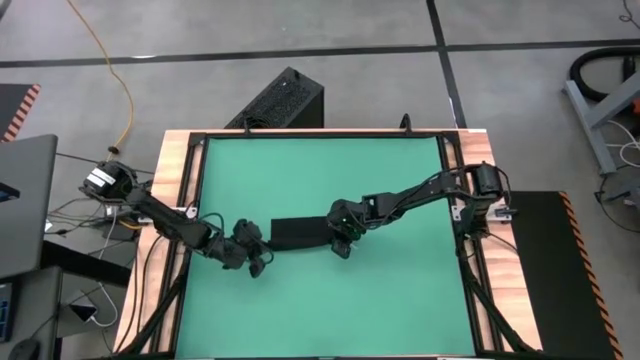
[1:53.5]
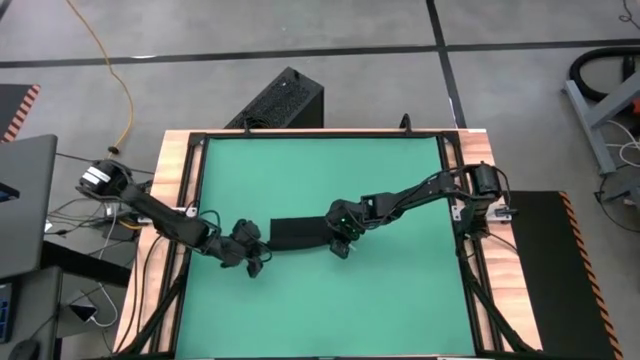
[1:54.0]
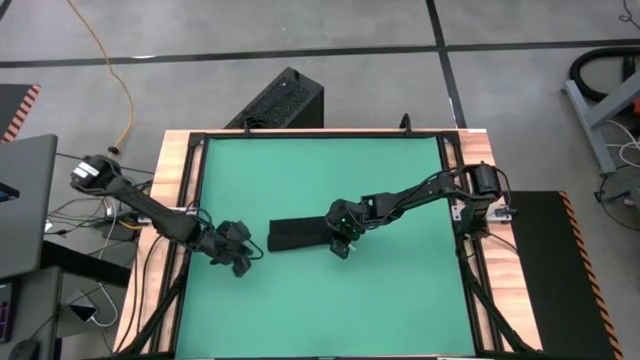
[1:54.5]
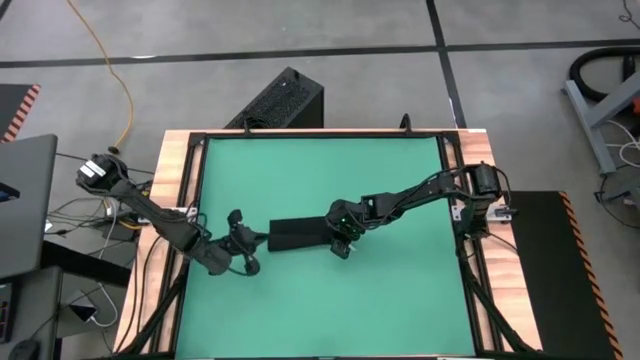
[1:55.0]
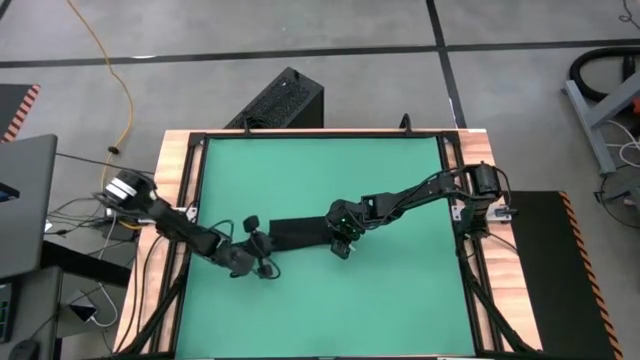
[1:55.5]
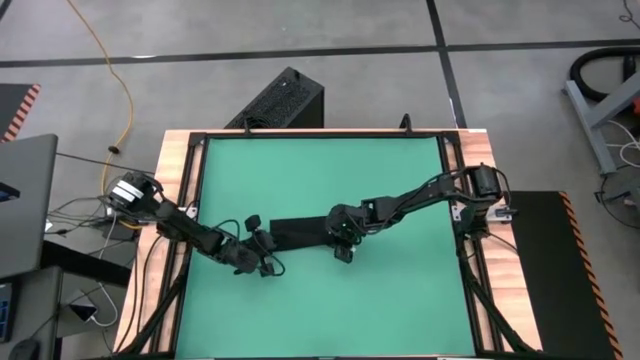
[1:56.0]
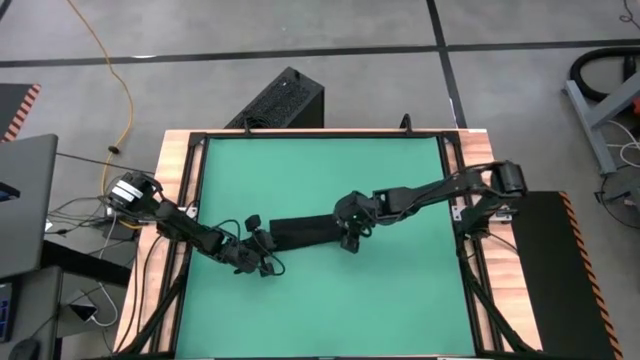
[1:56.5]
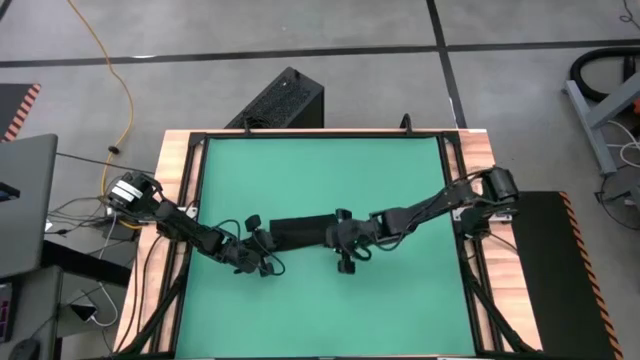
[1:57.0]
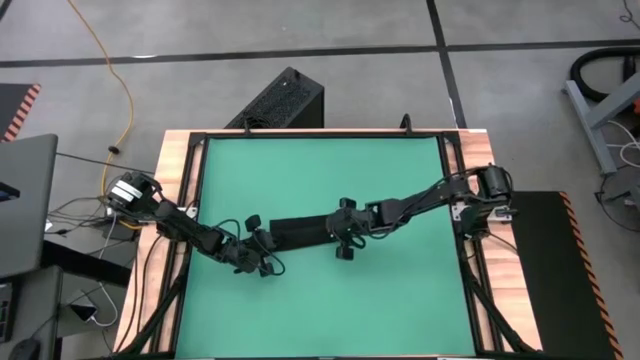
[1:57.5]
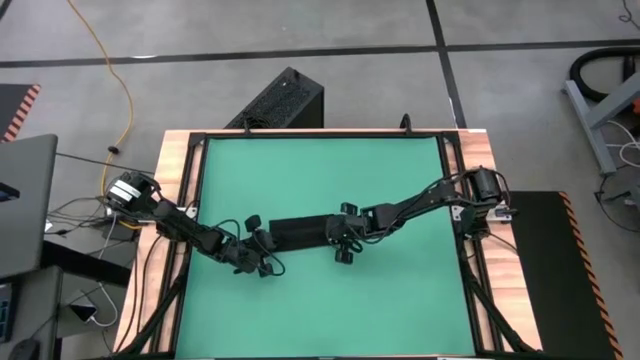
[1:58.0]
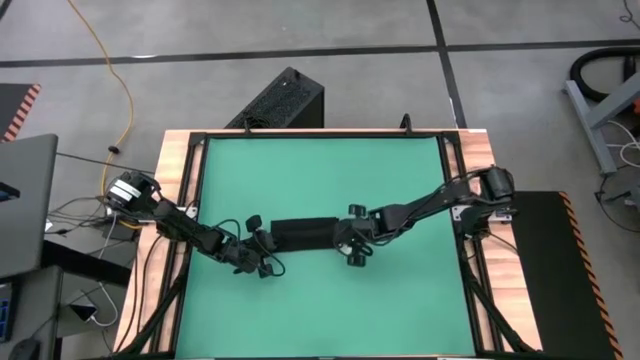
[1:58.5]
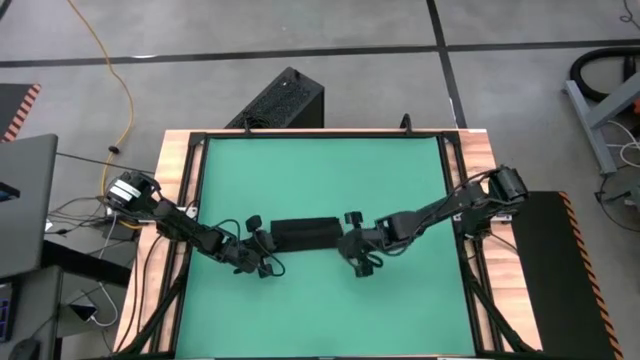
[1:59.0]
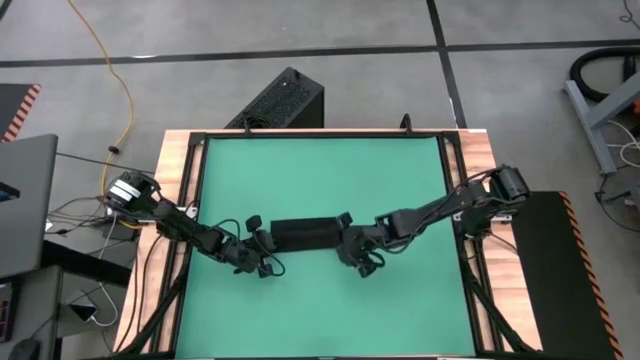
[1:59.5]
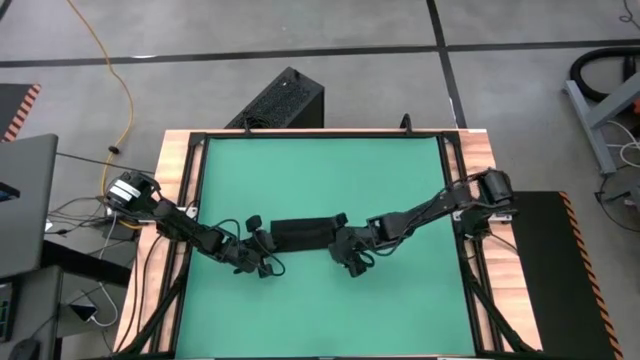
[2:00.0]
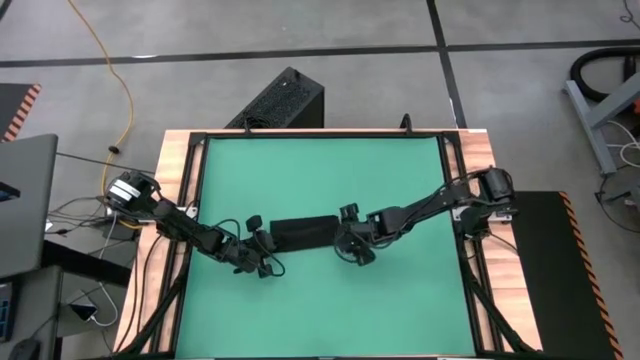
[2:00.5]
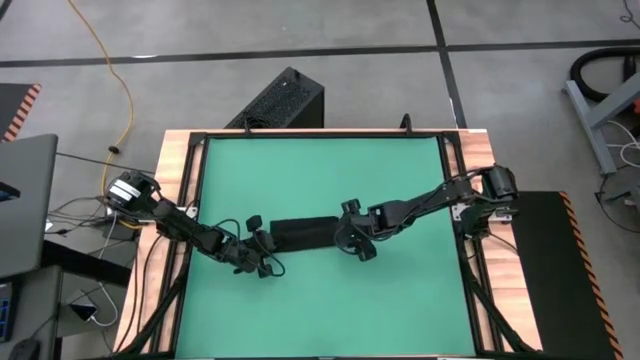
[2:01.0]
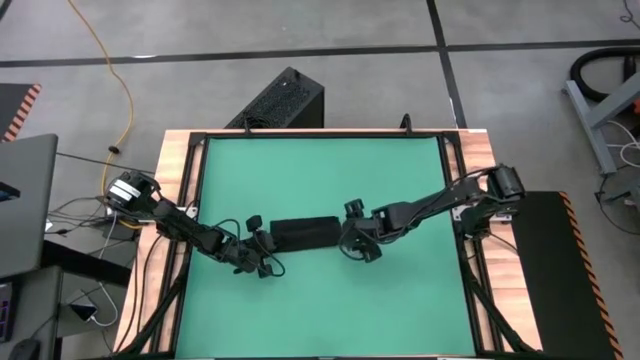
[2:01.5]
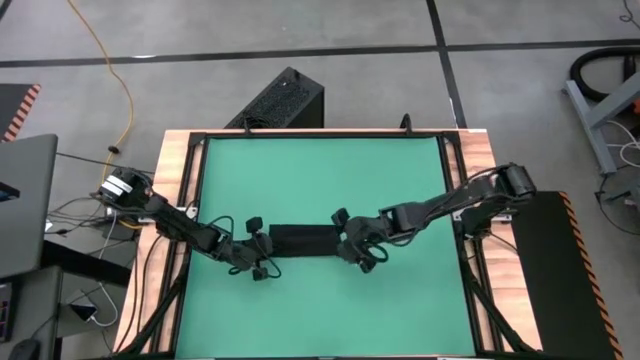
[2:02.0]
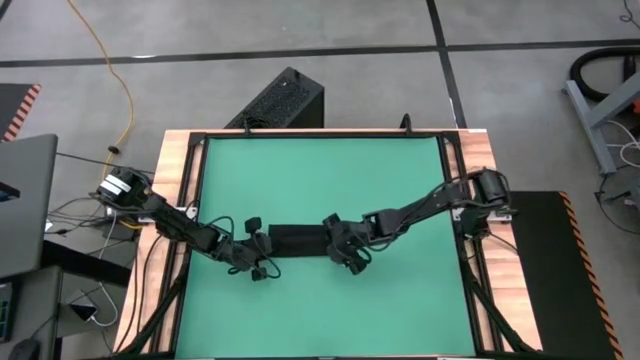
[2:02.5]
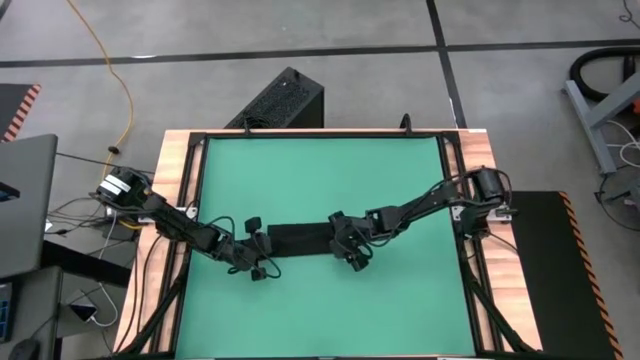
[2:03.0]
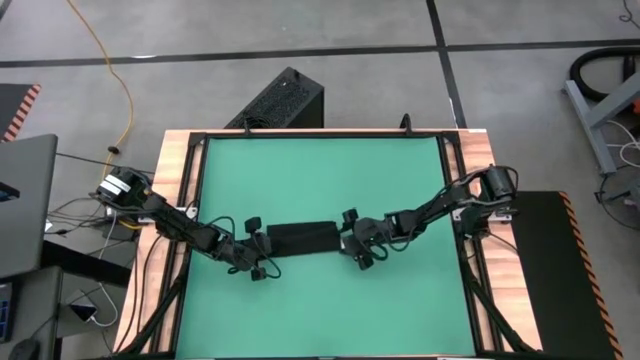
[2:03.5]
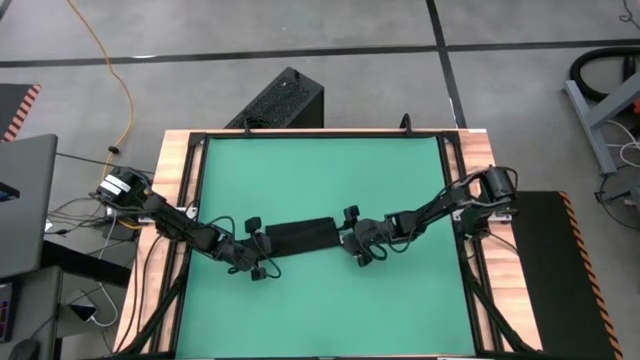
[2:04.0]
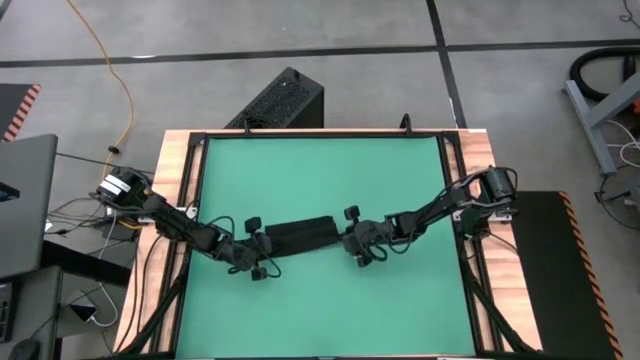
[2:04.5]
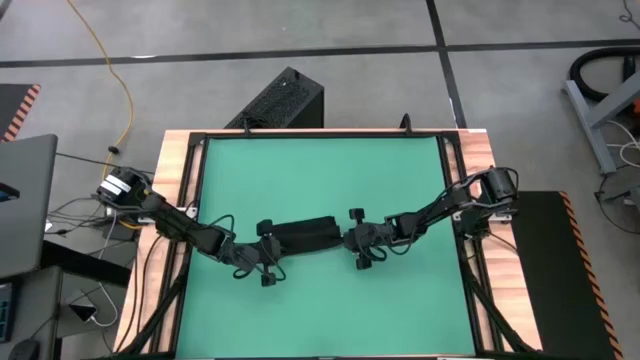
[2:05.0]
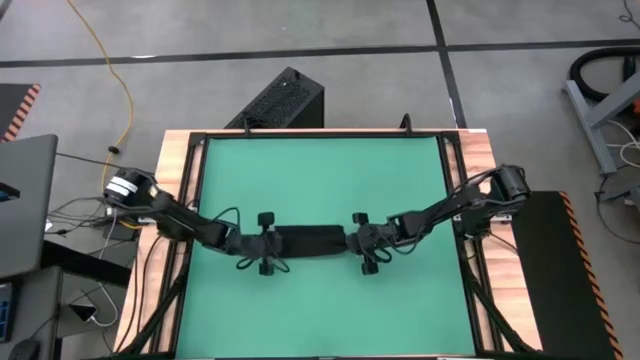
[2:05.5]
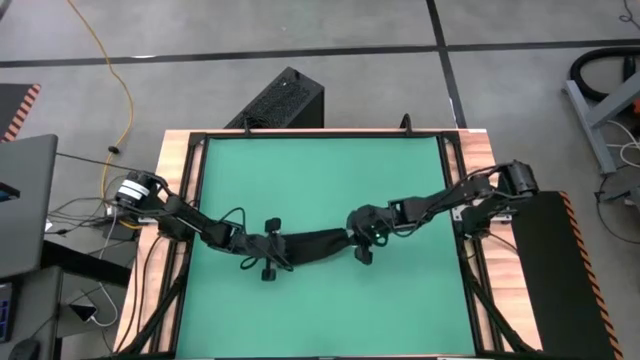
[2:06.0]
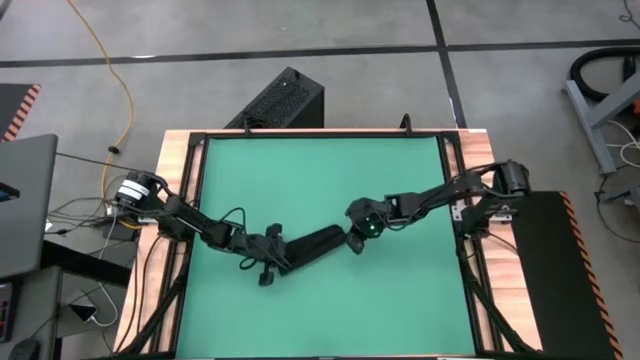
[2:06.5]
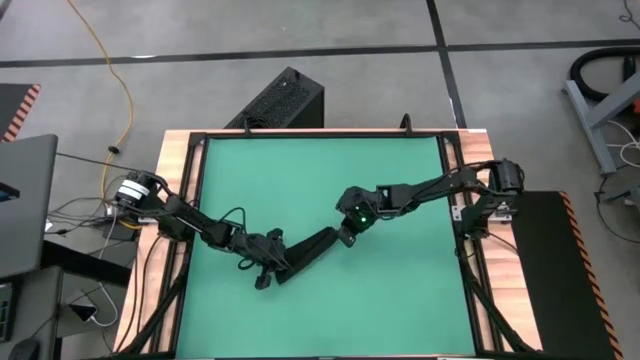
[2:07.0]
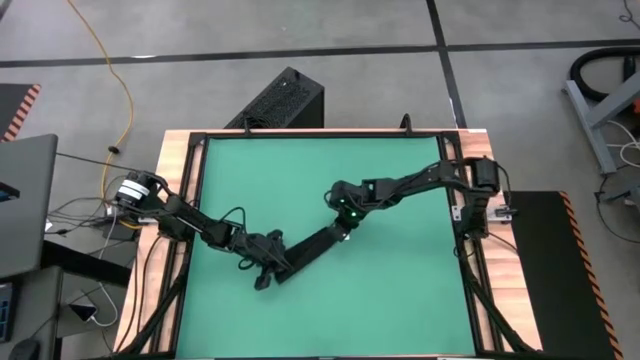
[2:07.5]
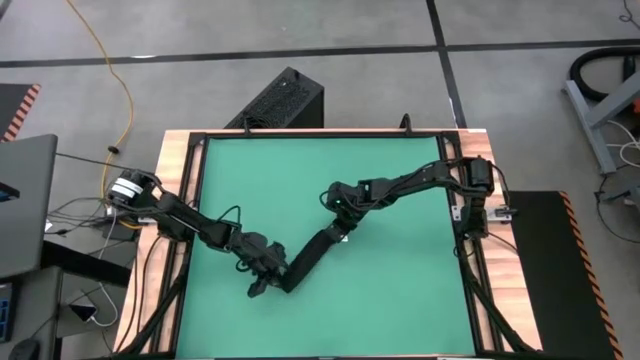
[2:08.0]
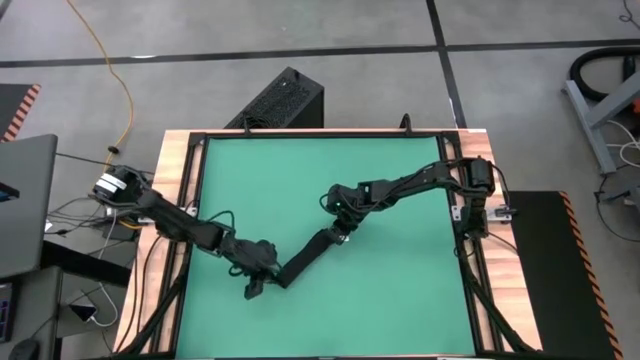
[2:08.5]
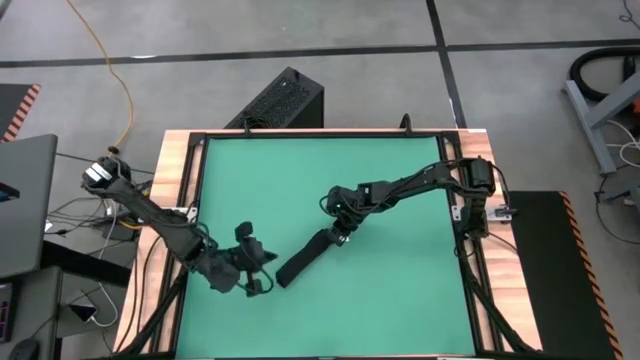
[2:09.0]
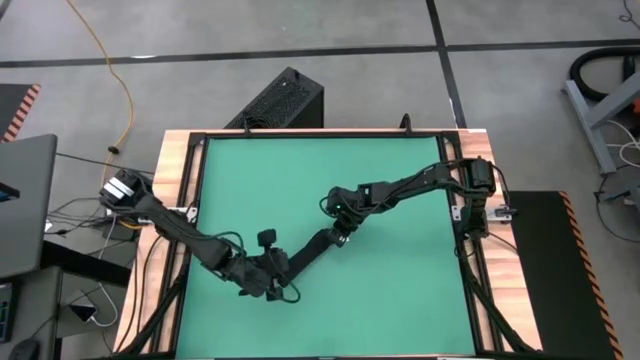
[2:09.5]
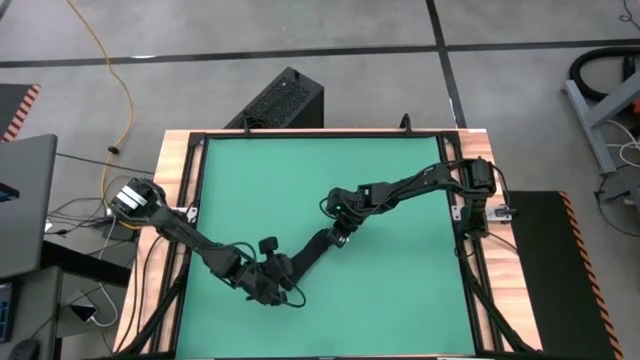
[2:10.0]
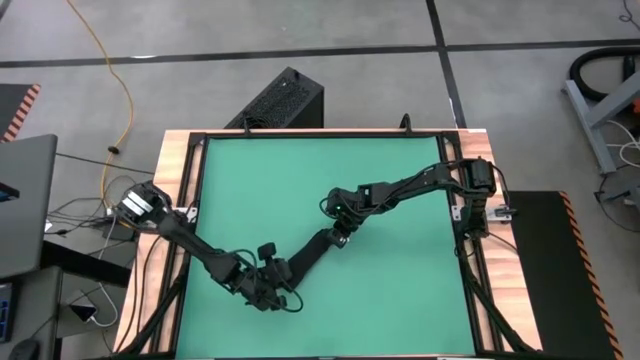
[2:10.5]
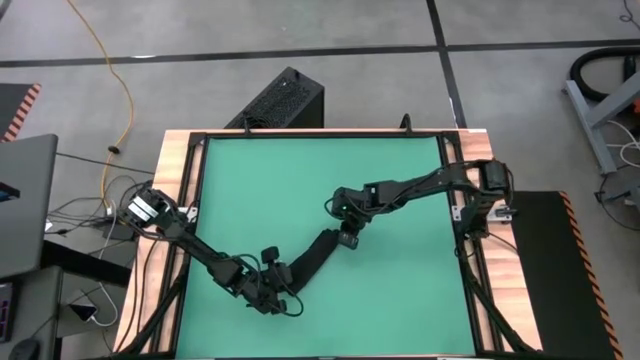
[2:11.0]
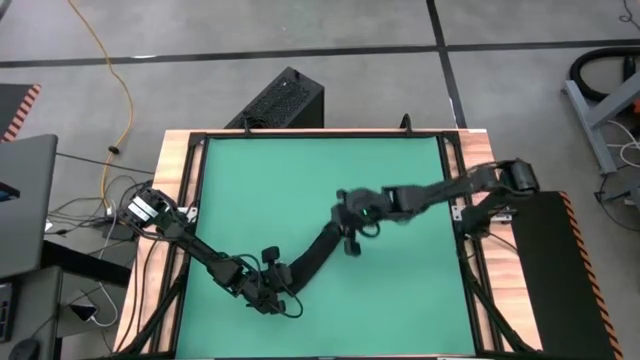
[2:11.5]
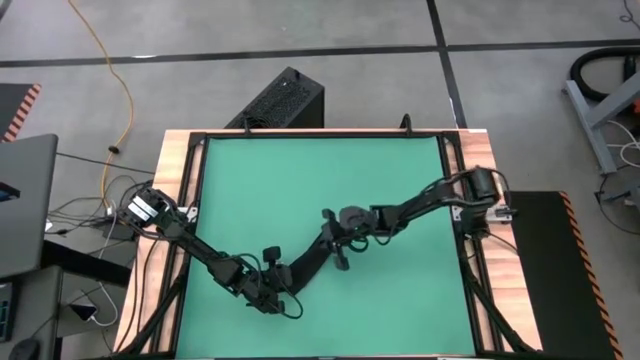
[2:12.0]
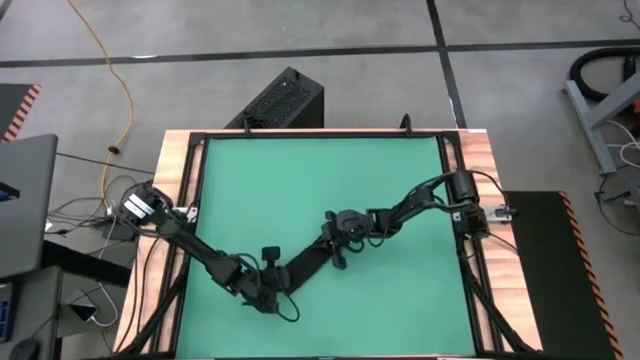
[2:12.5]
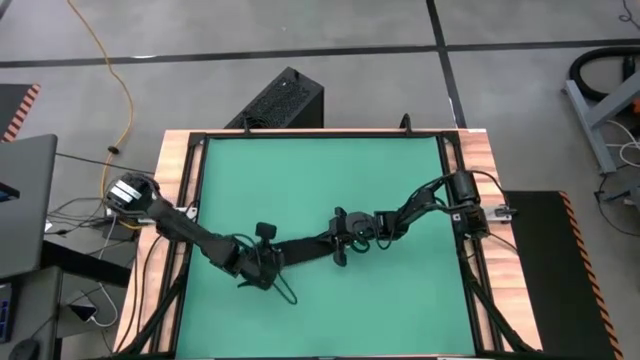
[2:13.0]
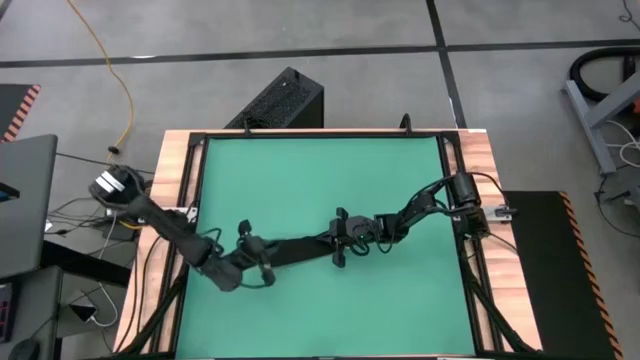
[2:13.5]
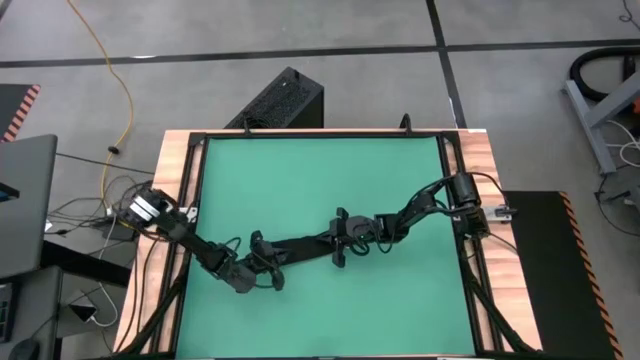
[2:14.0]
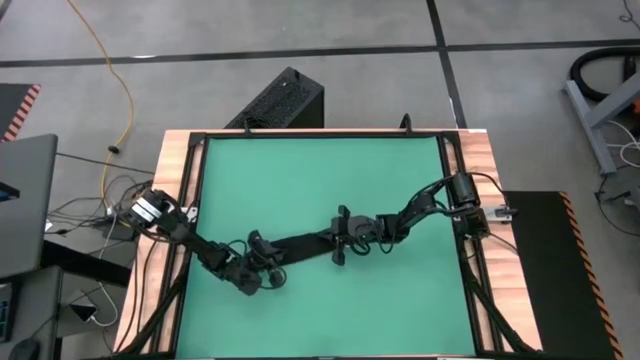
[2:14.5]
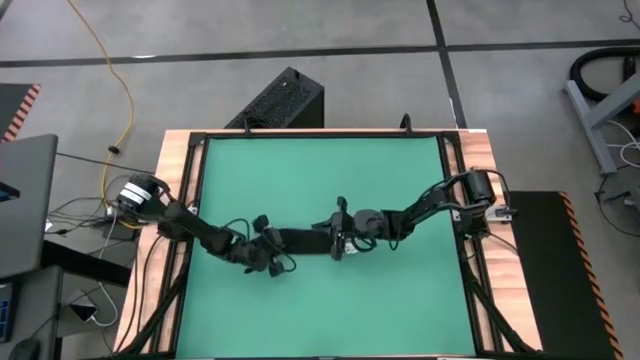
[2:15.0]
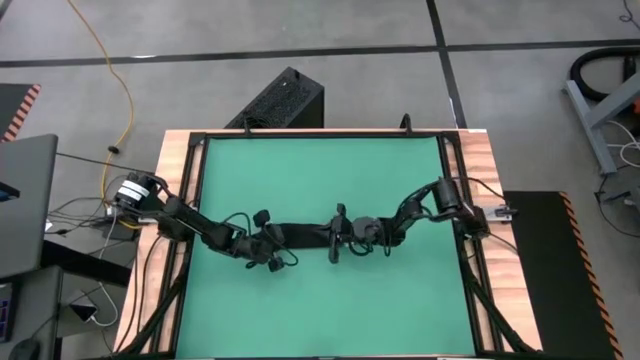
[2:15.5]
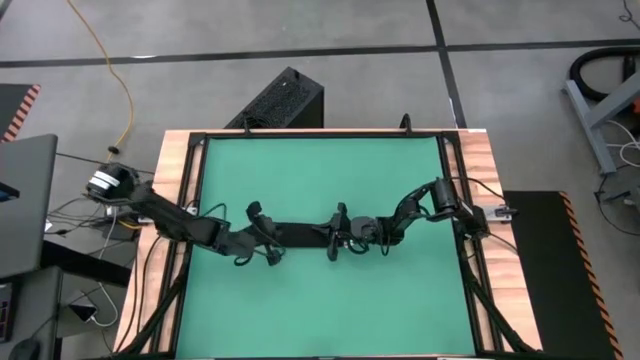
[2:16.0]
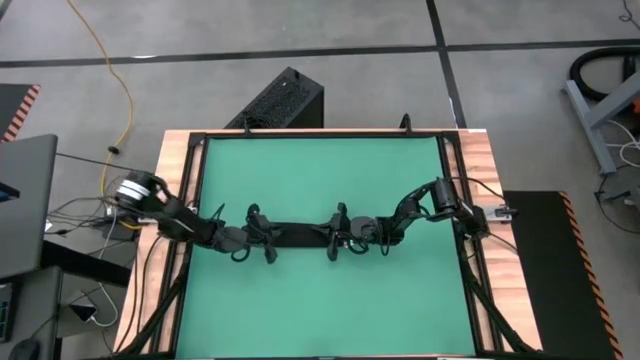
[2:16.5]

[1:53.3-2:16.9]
Task: Roll towel
Roll the black towel
